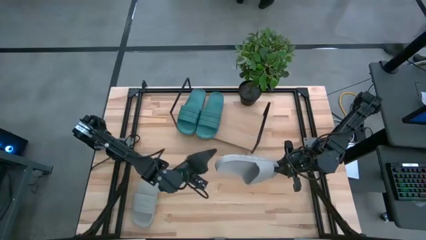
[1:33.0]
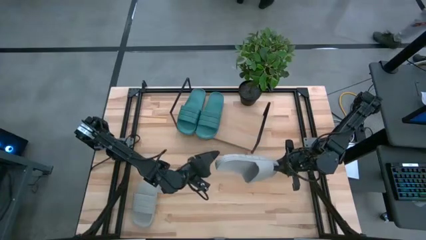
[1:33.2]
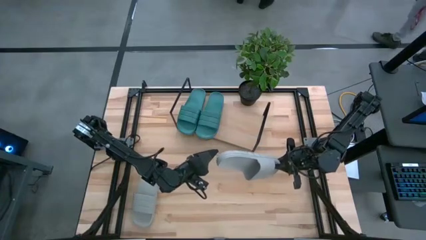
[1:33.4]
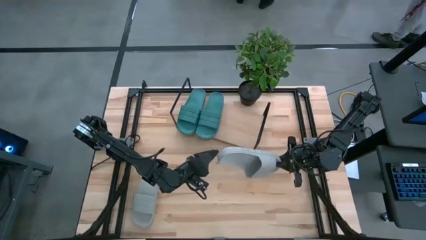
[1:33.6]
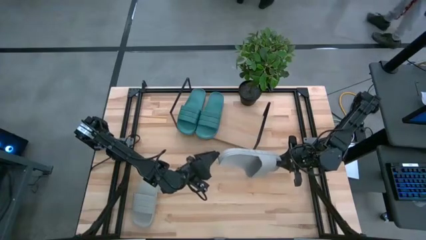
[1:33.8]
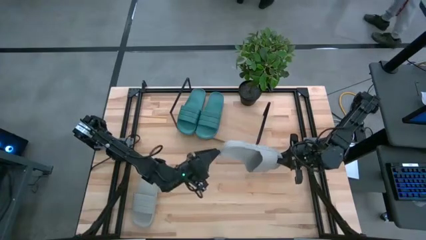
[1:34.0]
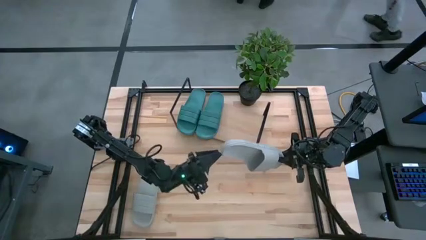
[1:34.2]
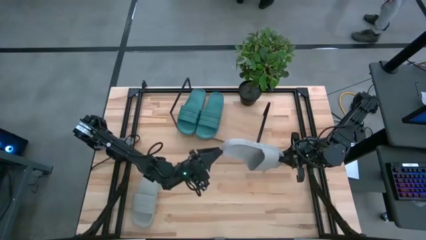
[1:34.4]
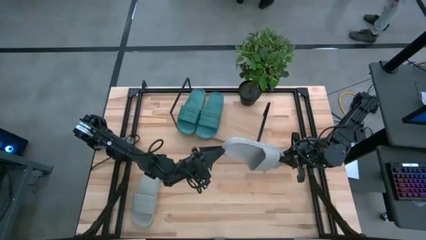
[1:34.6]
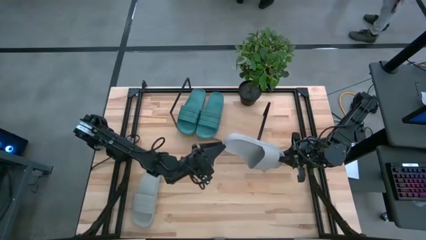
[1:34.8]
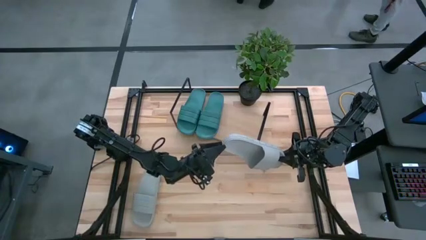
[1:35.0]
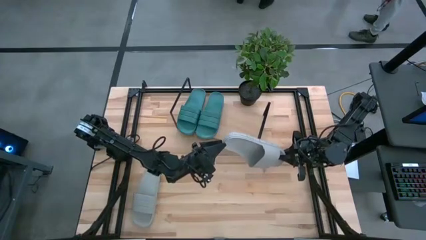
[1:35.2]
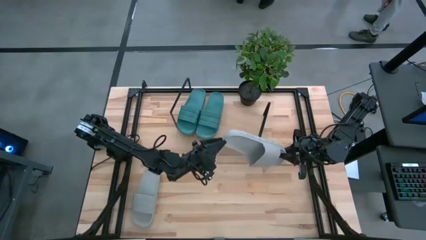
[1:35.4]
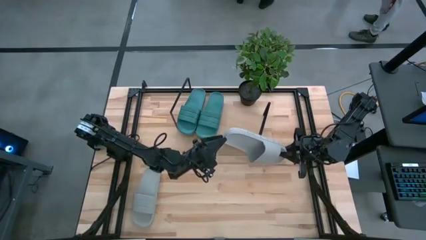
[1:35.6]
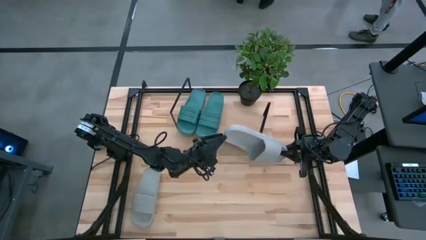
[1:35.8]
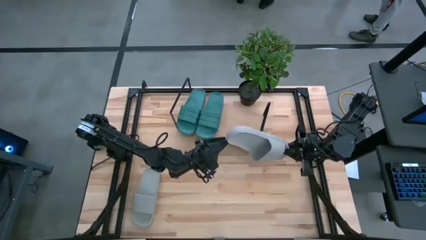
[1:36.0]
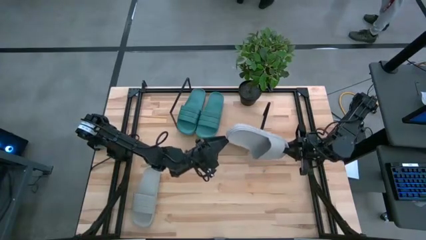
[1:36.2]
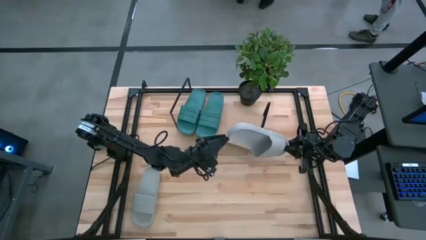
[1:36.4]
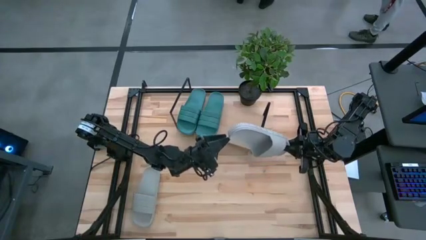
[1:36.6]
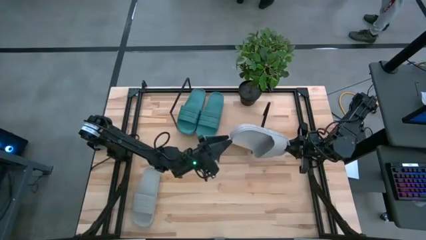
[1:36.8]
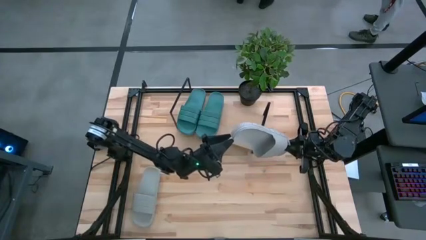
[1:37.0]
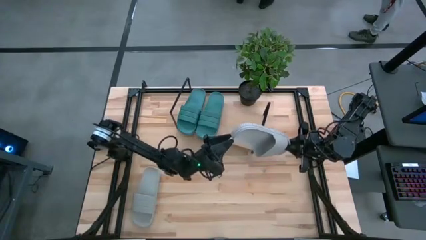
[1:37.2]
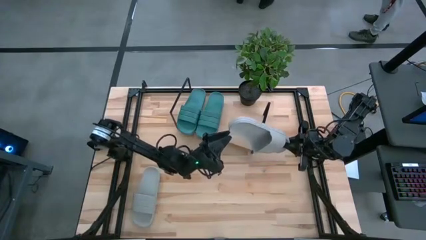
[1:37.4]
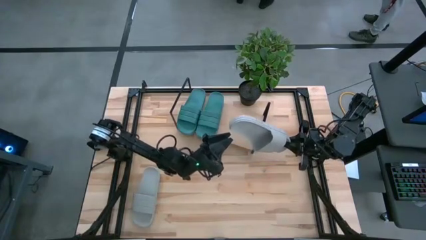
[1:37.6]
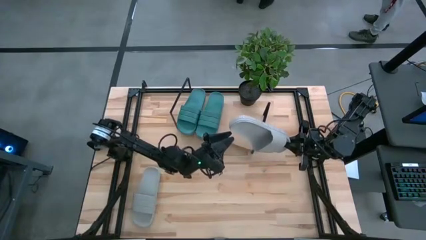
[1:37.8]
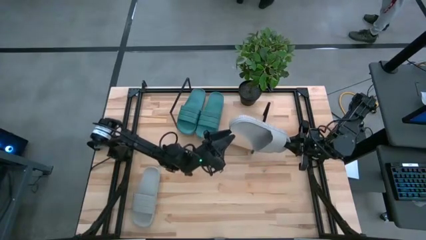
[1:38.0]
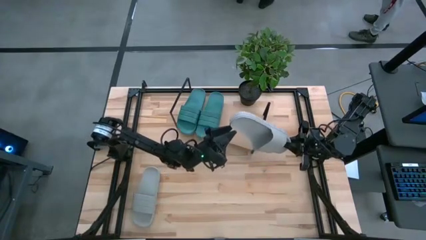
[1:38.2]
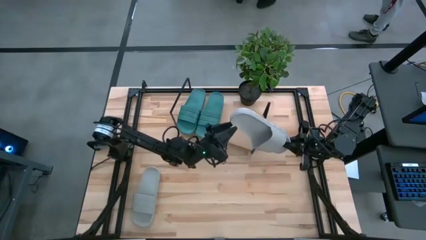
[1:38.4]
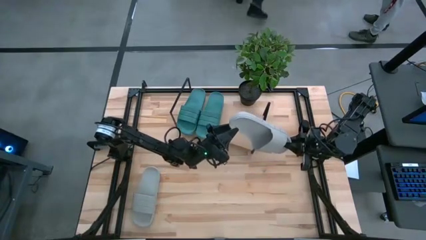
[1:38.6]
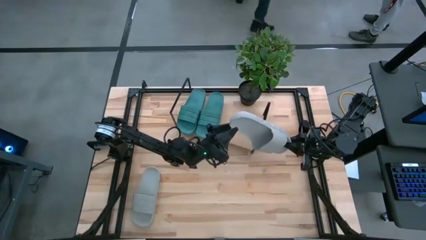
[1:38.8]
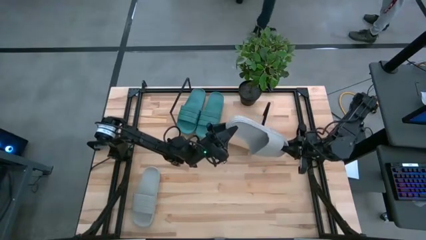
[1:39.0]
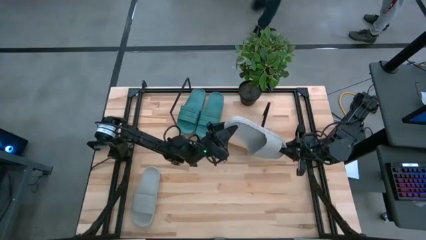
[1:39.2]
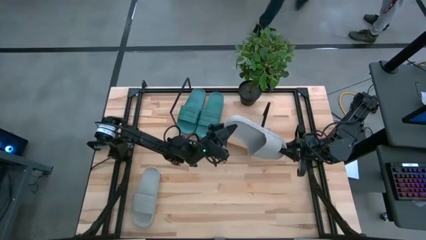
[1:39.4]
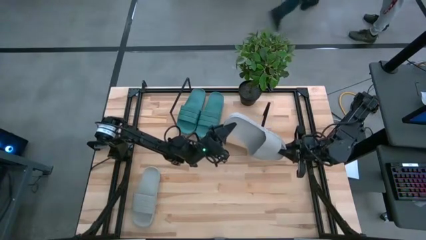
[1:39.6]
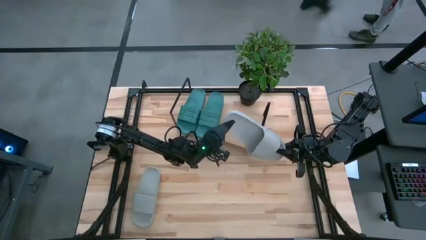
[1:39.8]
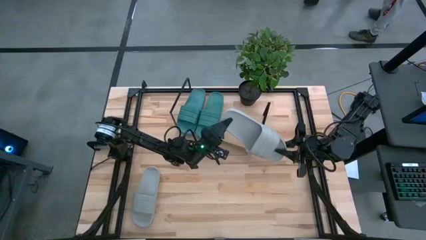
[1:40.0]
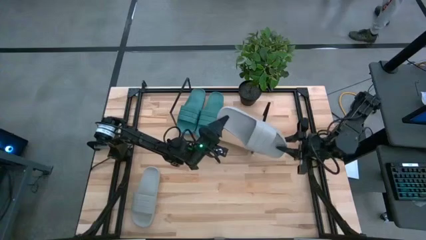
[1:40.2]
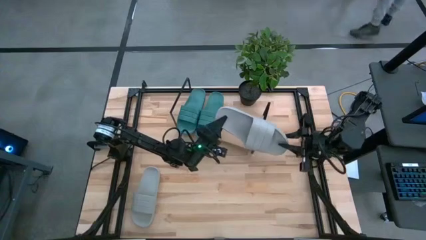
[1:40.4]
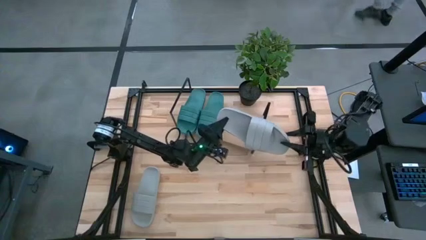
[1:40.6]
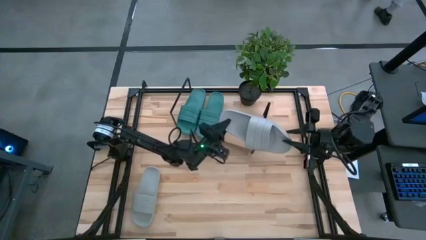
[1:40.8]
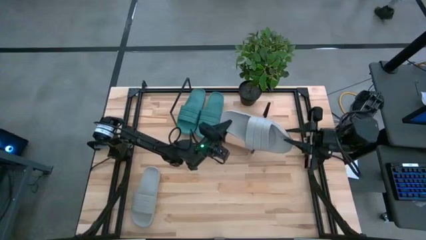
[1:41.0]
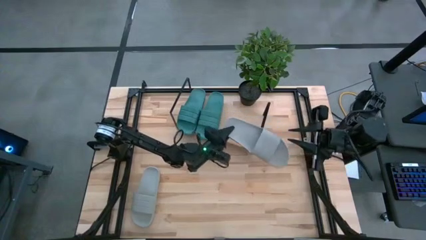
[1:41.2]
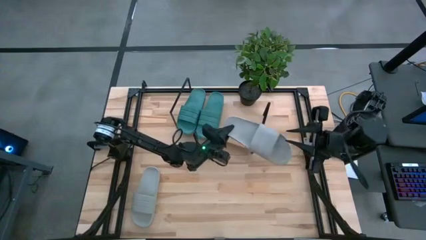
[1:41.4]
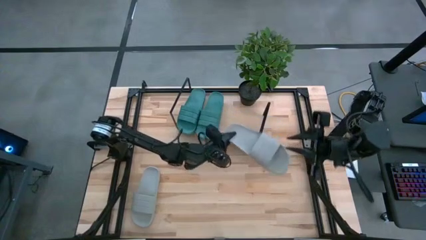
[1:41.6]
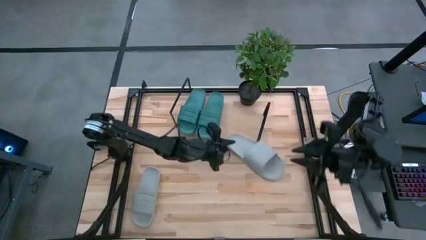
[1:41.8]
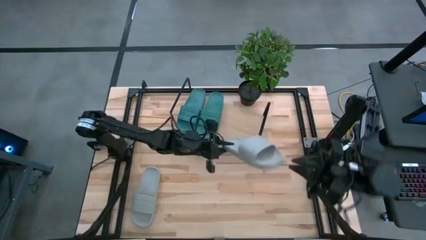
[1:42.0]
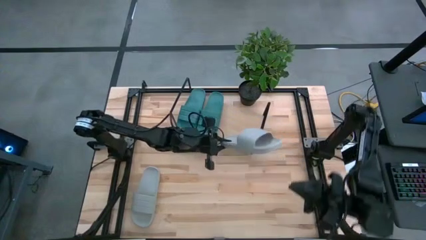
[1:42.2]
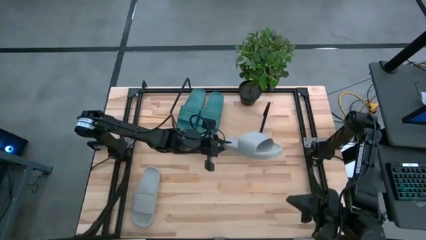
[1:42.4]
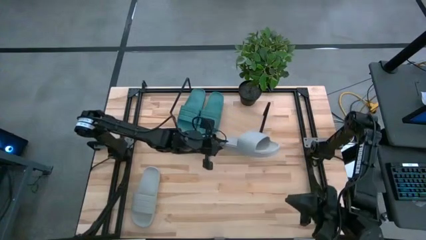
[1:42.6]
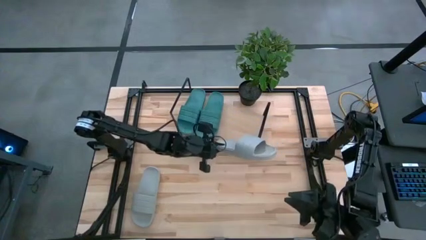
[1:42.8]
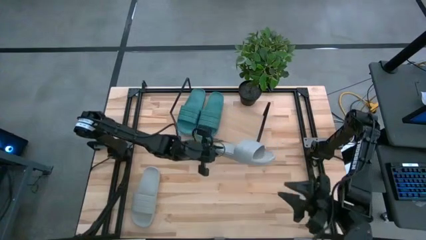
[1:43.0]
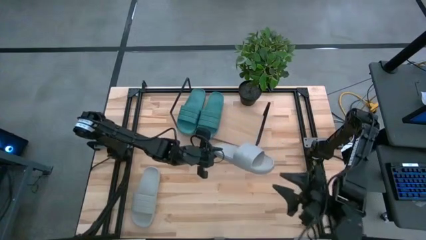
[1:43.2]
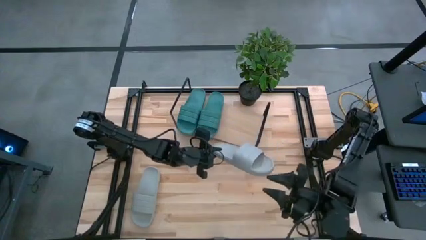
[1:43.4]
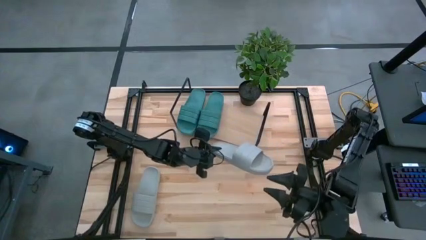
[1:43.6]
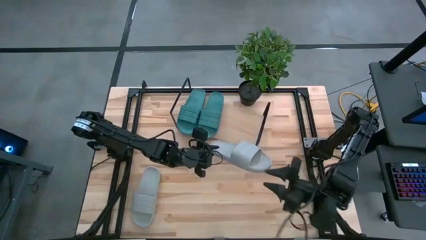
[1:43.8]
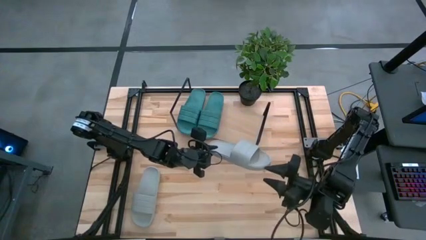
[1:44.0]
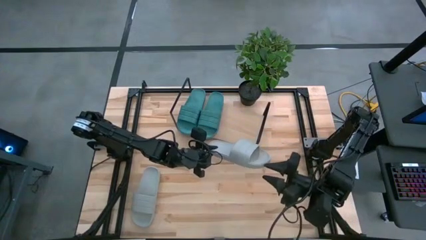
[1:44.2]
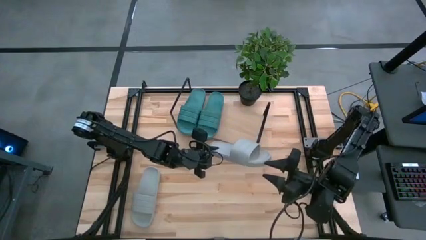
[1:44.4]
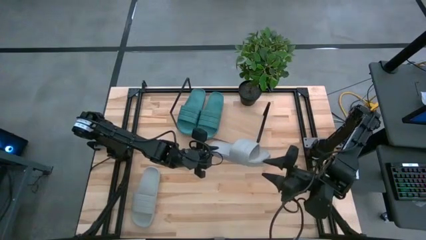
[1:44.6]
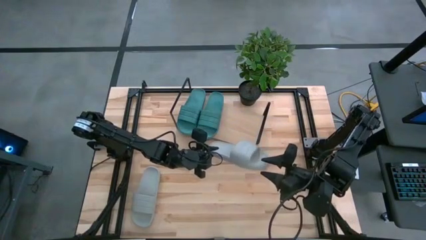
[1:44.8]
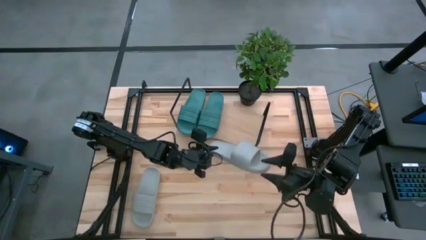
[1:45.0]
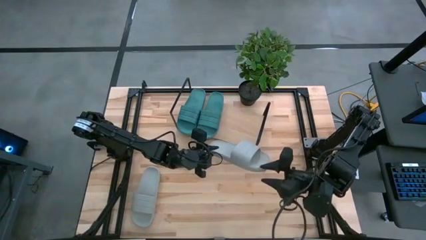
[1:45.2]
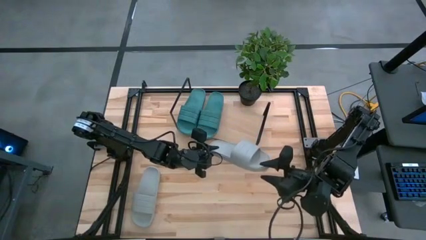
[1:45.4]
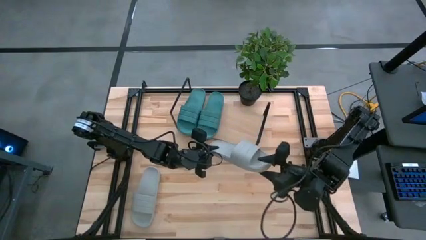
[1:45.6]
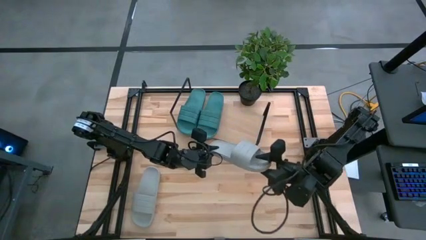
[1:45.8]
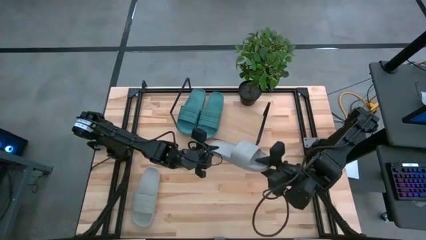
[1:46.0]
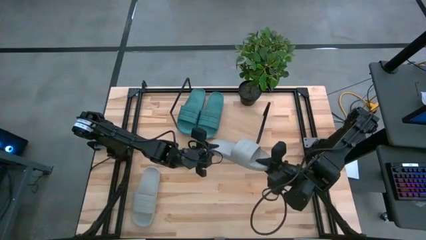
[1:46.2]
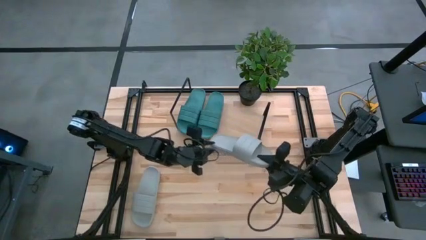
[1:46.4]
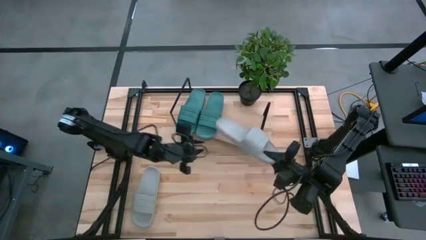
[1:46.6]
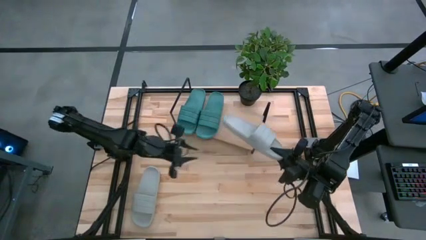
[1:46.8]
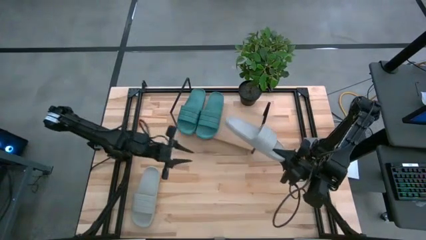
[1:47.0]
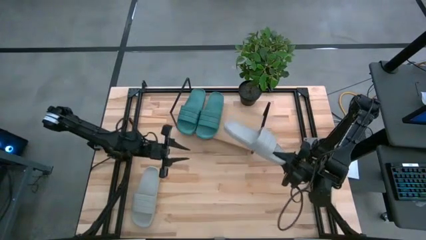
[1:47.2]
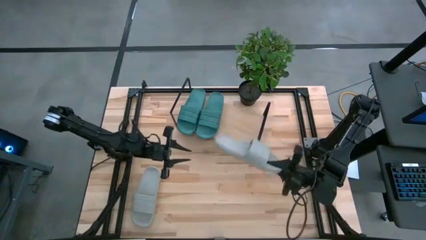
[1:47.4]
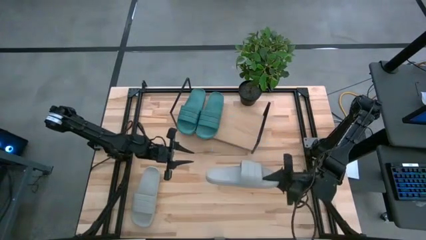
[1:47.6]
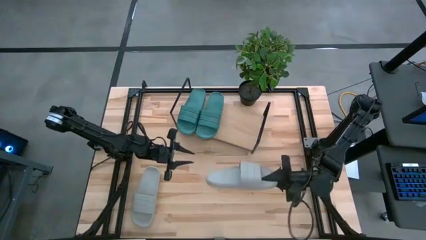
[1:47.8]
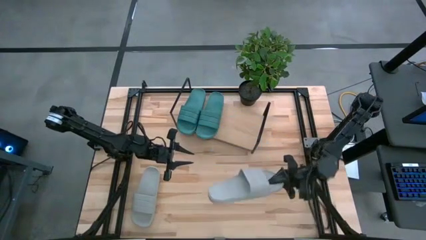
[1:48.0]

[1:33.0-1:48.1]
Task: Pick and place slides into the shelf
Put the top gray slipper on the shelf
